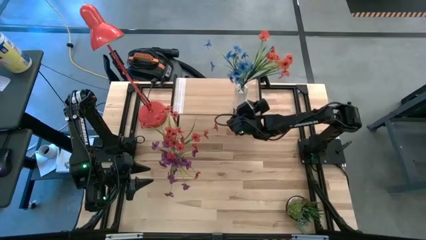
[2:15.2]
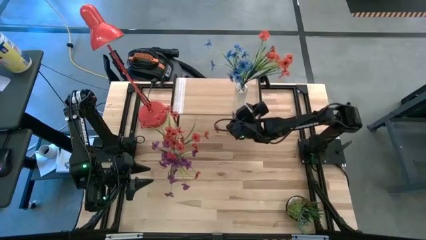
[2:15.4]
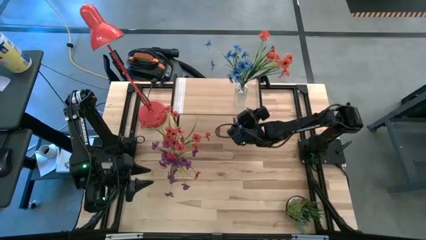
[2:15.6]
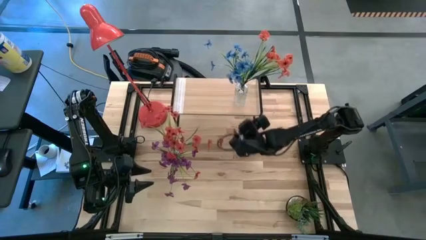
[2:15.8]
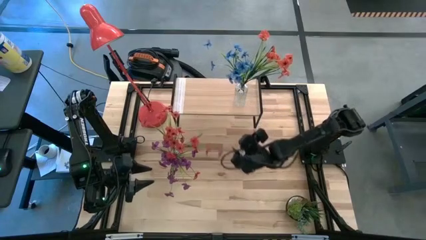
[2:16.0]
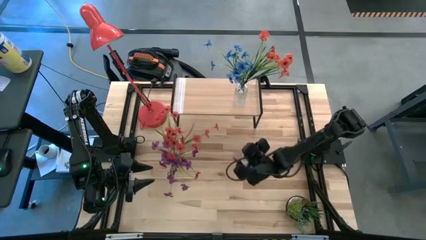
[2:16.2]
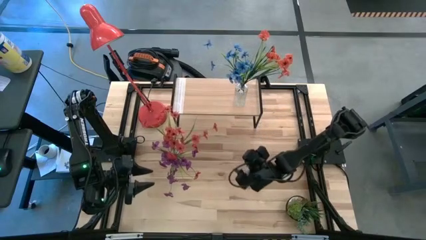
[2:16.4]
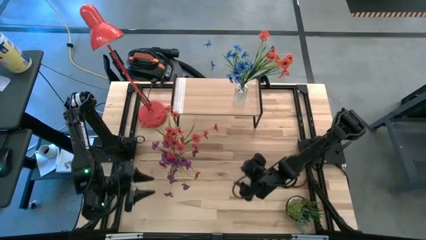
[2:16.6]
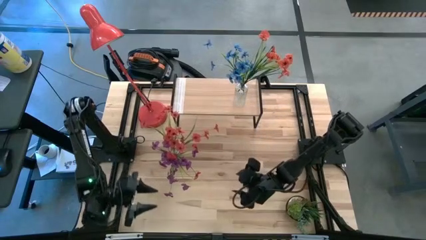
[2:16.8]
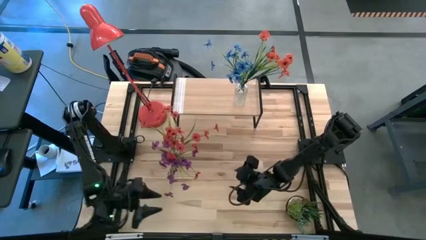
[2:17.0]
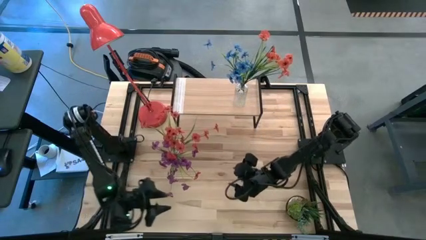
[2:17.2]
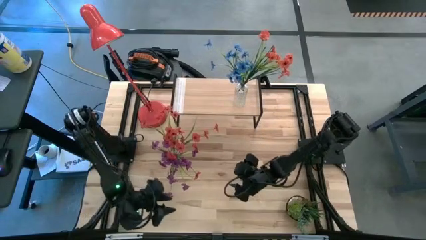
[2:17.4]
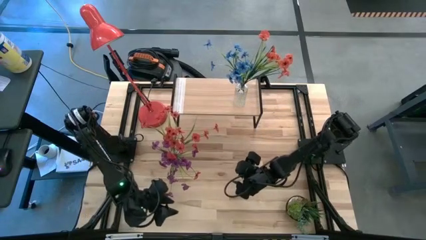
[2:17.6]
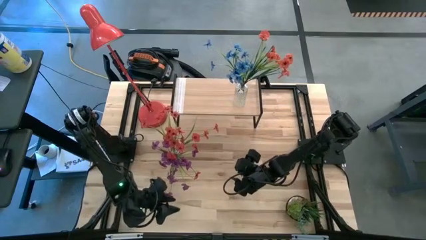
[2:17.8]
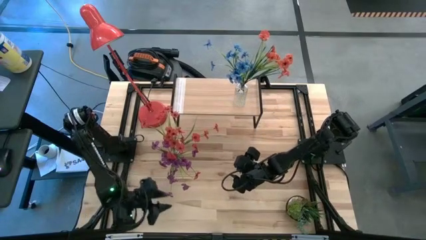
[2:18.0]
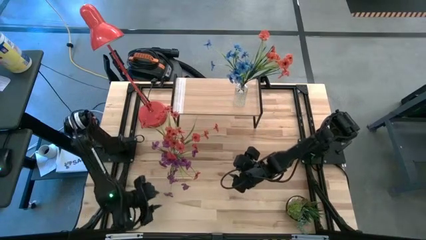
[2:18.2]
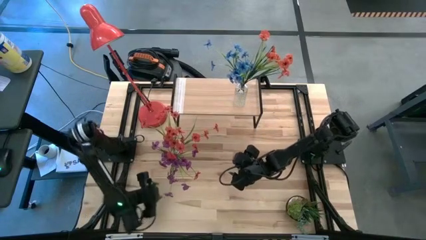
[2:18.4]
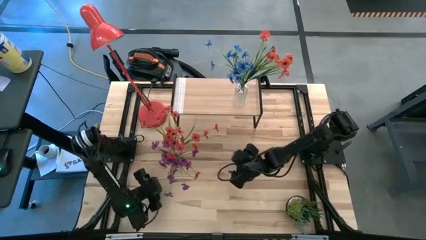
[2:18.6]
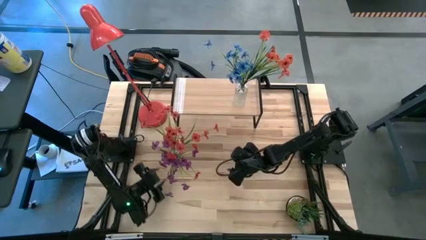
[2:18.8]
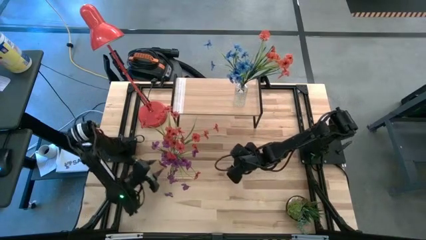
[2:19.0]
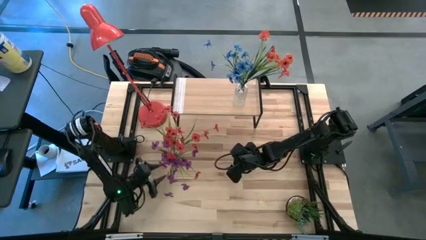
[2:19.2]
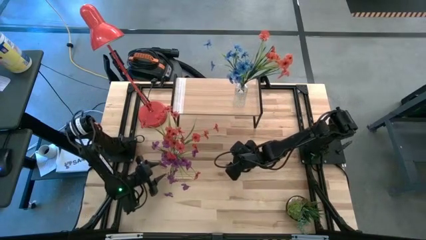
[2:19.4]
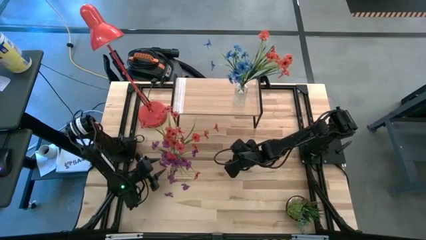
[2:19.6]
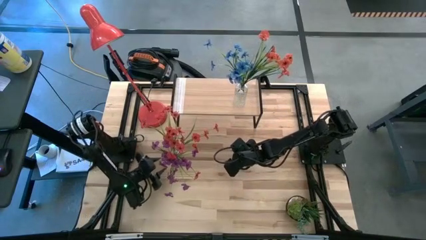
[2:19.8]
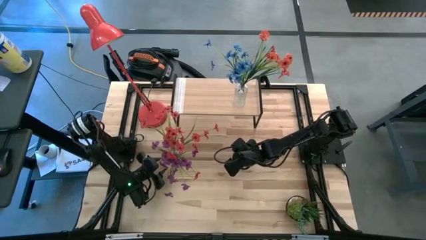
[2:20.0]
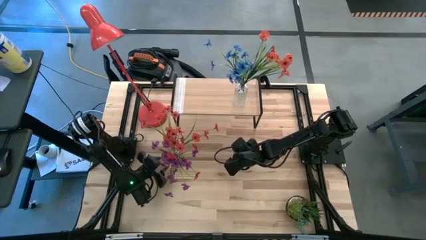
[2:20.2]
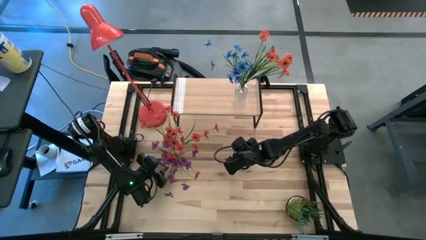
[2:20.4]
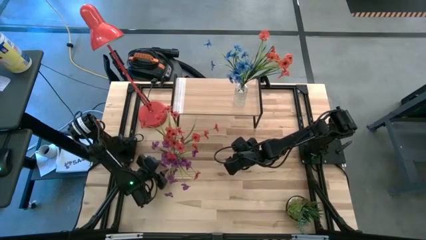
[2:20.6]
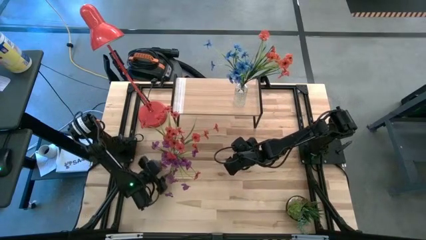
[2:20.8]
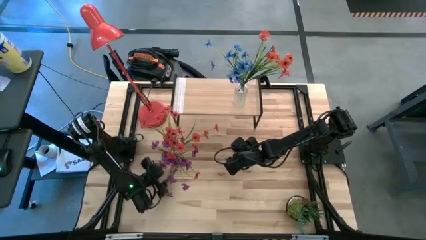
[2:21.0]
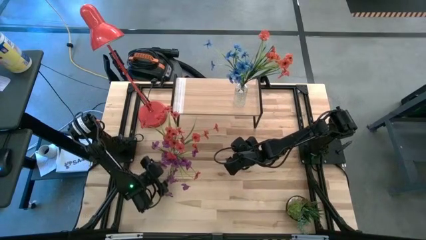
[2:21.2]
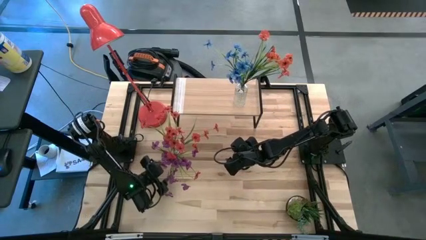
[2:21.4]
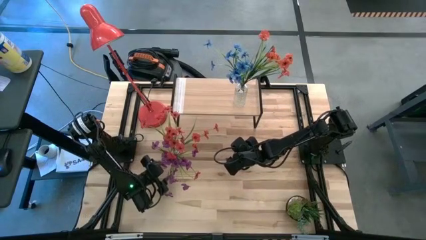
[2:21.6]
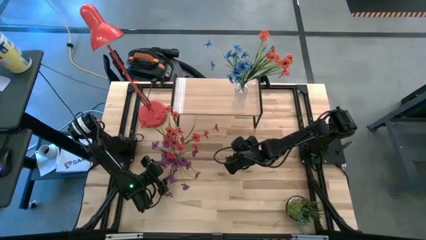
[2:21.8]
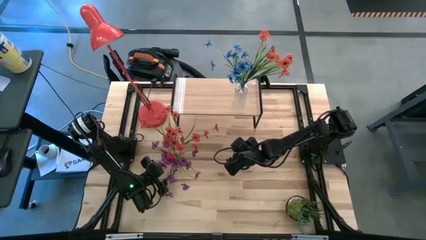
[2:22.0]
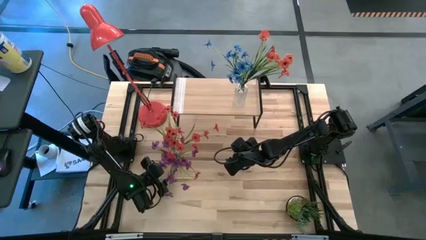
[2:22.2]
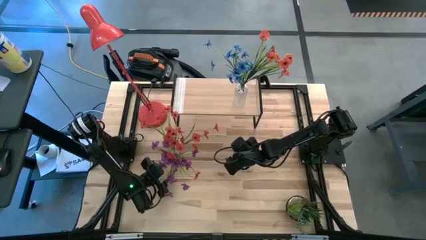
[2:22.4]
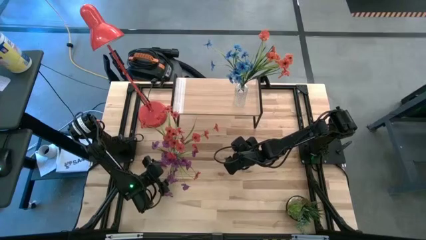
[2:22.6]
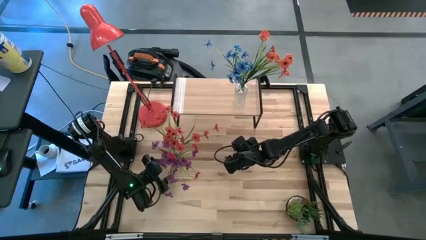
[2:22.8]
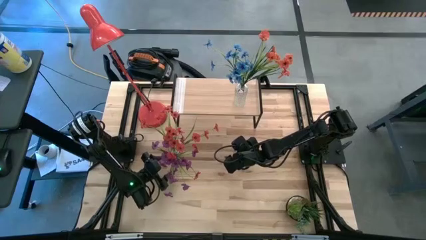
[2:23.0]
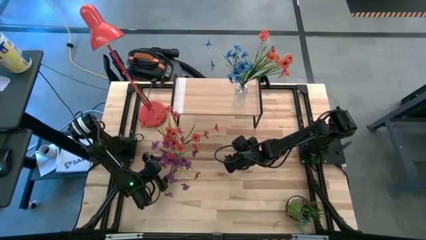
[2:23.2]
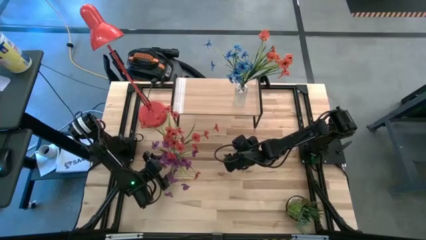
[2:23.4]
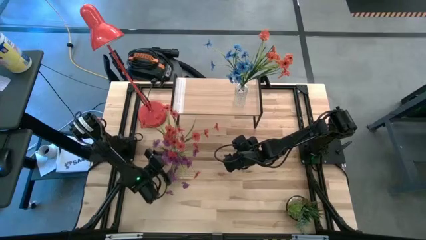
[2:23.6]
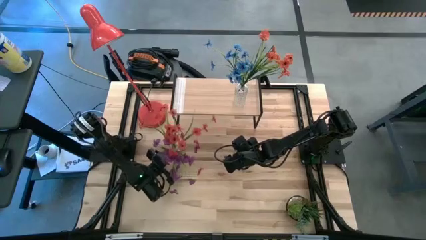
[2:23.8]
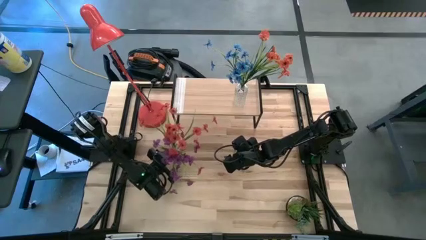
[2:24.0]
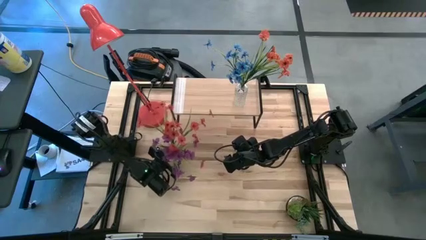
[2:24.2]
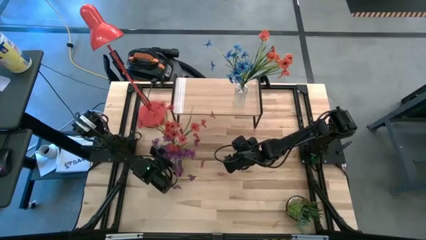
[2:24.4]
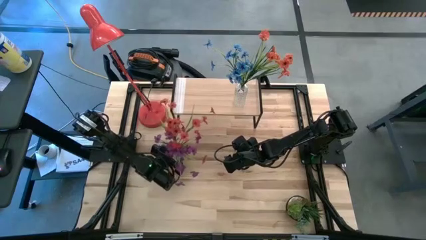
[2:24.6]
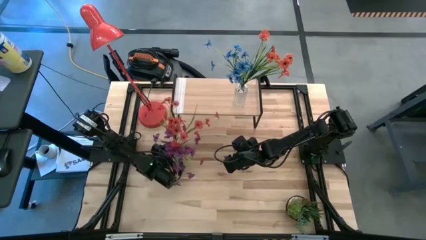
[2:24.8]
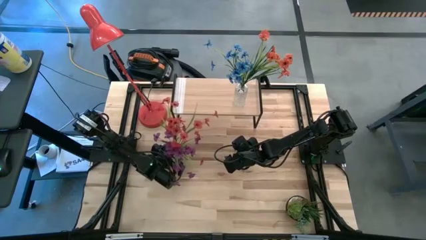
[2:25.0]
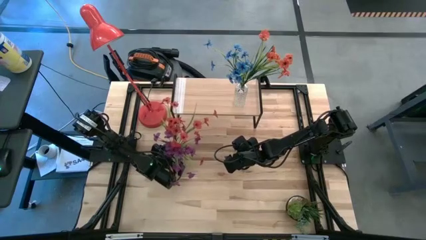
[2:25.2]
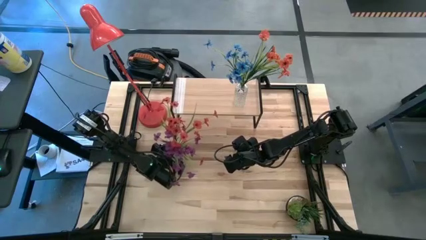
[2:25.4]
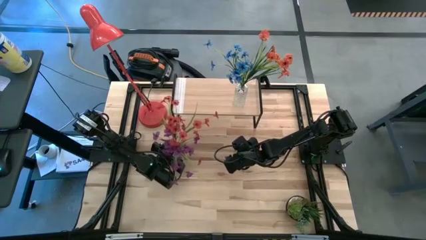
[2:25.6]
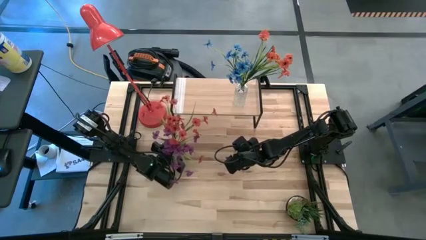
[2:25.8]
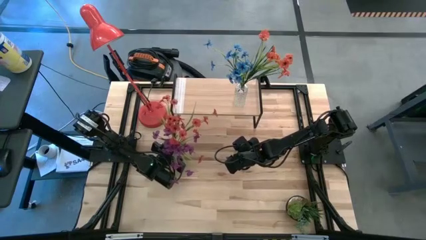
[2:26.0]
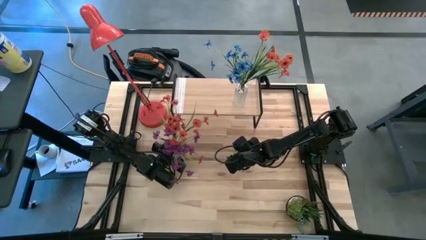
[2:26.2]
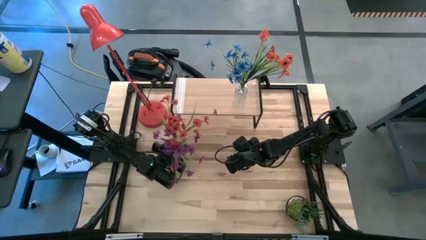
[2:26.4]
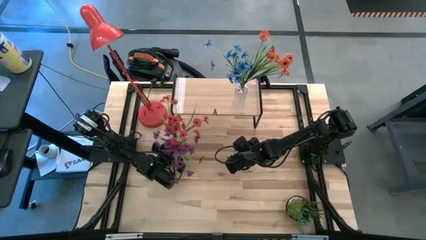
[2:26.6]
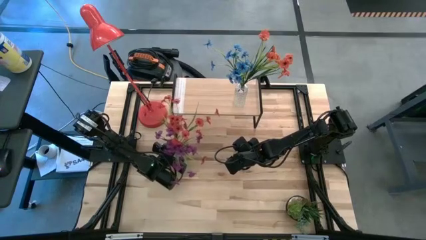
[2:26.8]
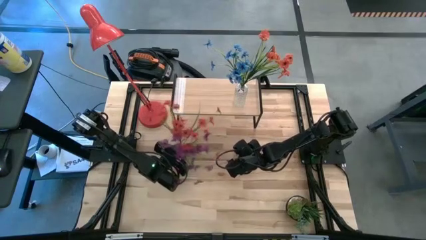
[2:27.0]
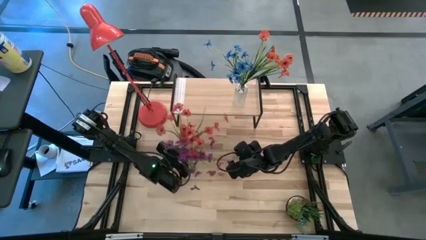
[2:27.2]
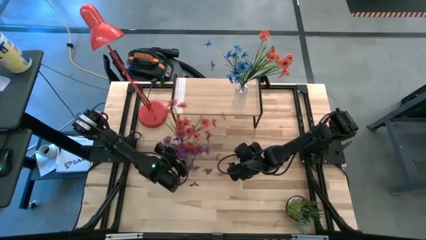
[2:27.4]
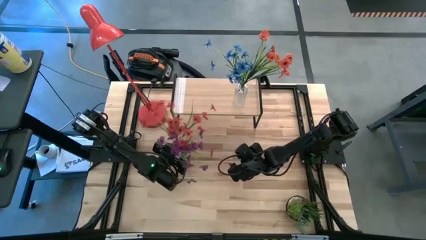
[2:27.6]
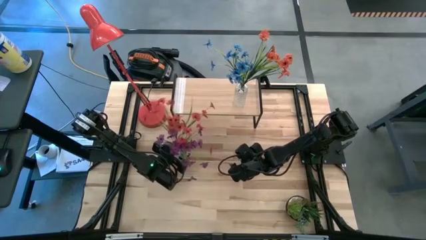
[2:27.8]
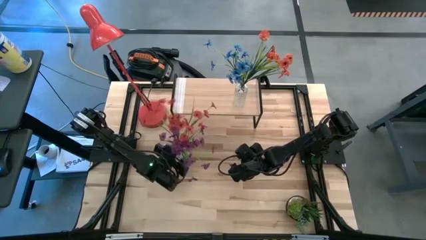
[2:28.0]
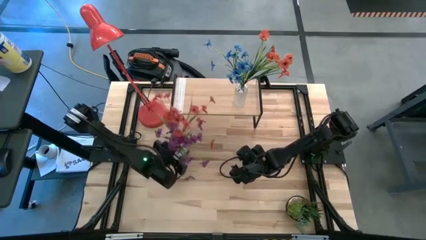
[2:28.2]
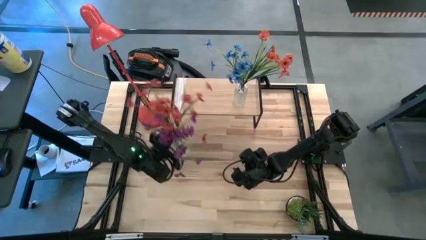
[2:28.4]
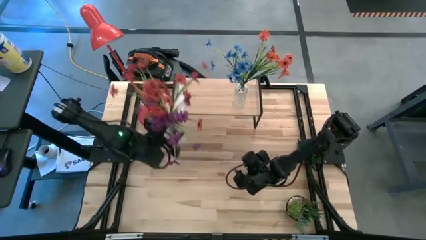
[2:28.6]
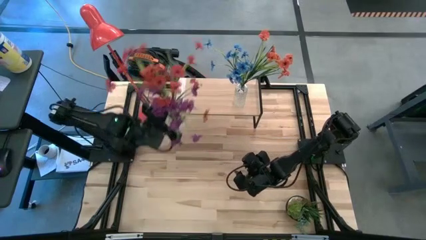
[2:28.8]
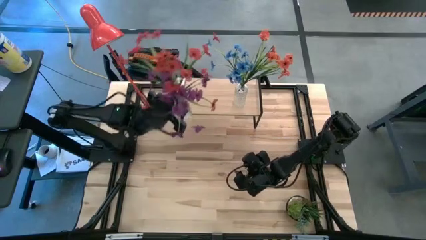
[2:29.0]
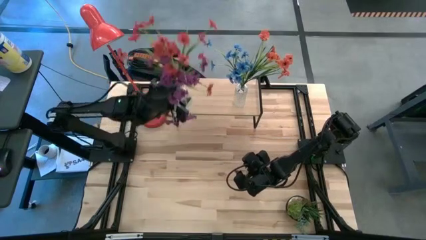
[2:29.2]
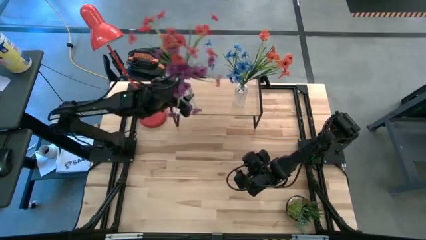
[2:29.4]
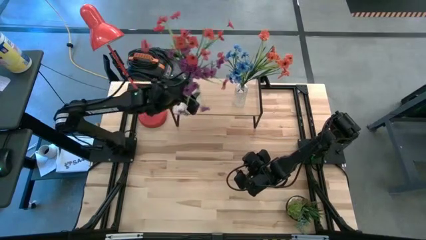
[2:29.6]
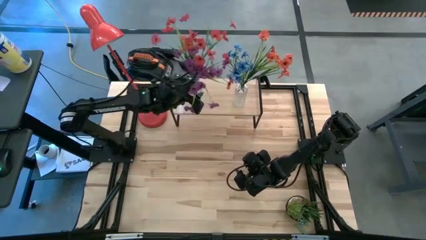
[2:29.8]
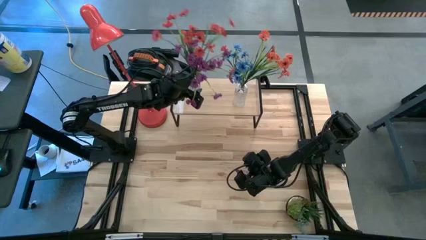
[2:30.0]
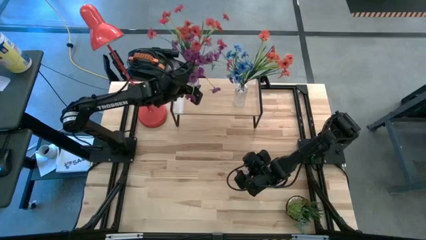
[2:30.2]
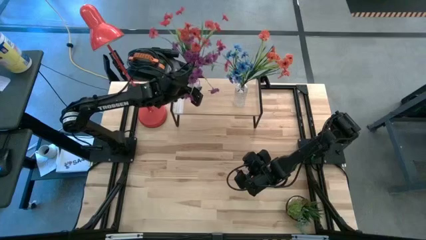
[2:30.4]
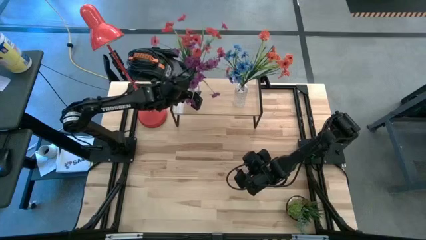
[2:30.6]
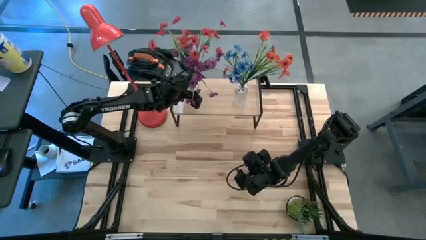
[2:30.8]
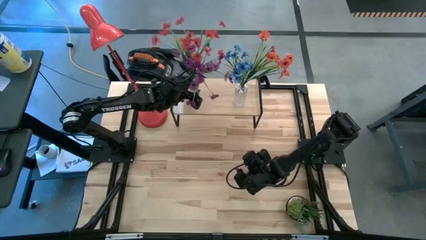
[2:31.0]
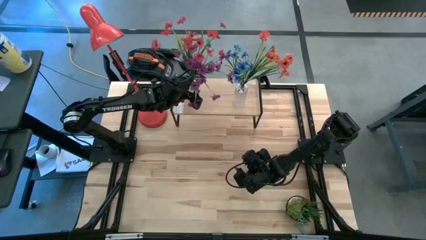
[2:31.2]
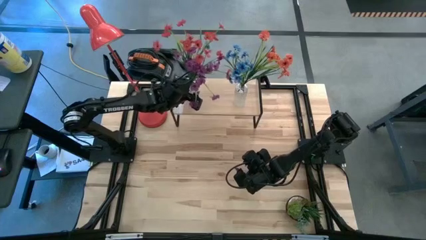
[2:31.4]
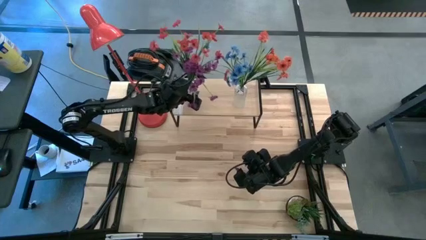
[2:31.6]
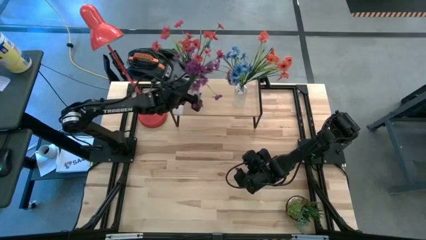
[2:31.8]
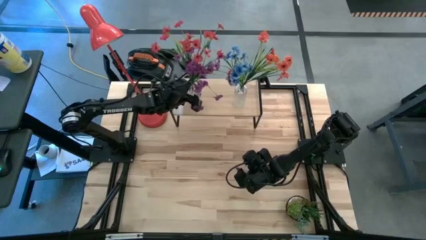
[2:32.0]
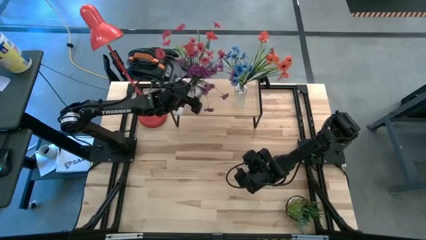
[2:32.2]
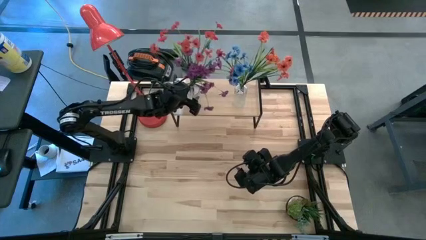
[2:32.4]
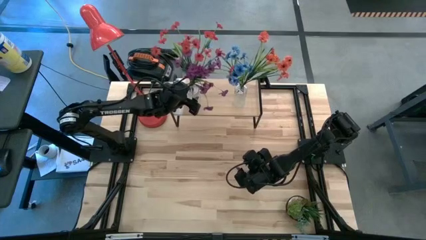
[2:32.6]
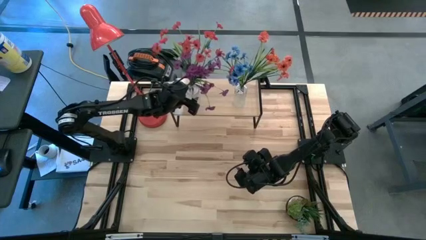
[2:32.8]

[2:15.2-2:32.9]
Task: Pick and place flowers into a vace then onto a shelf
Put the transparent flower vase containing the purple and orange flowers on the shelf
